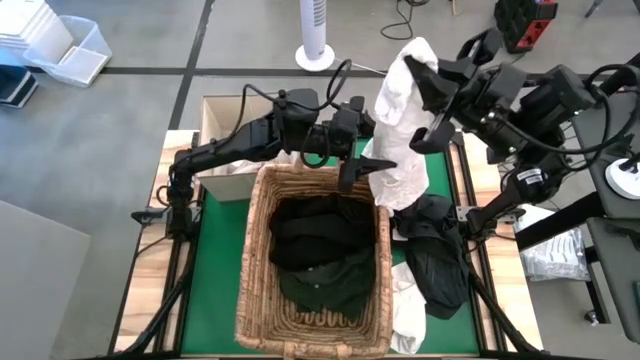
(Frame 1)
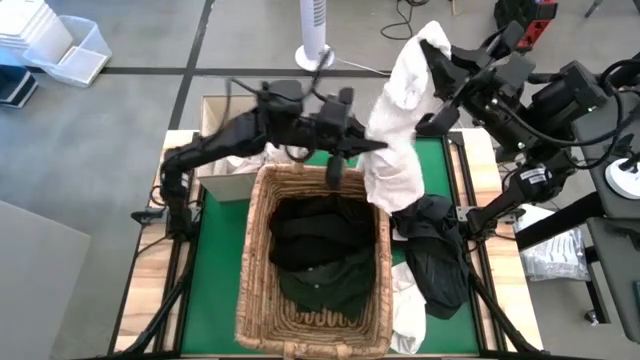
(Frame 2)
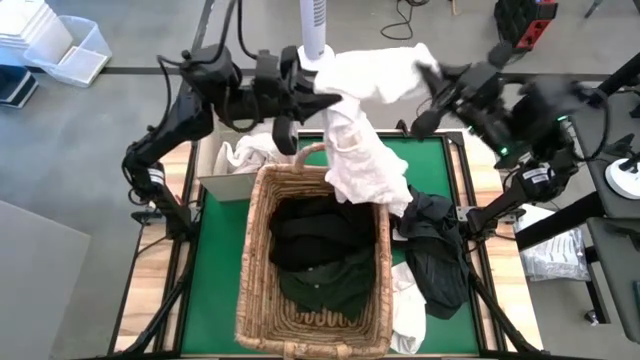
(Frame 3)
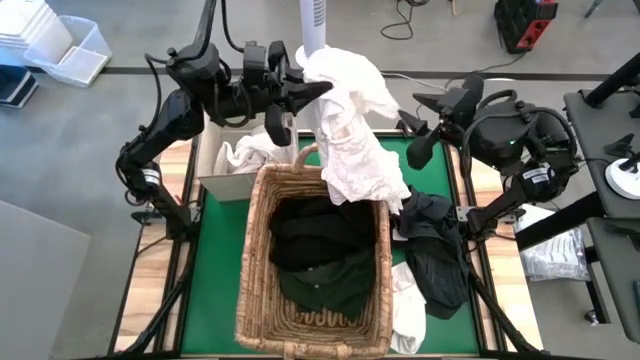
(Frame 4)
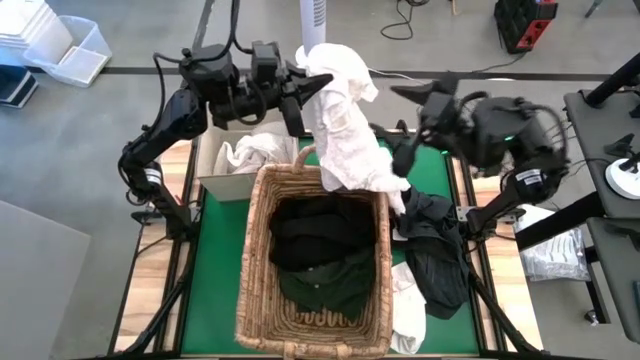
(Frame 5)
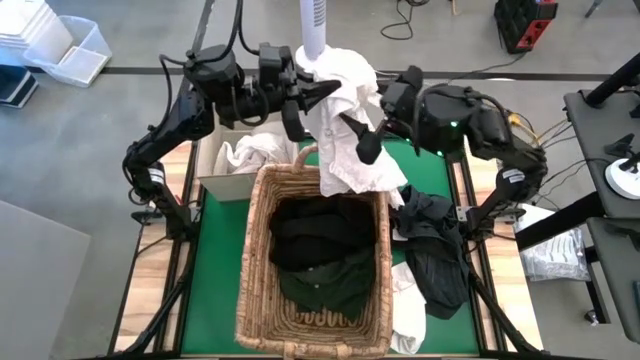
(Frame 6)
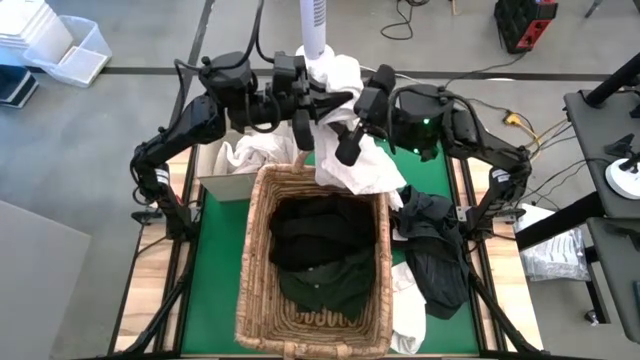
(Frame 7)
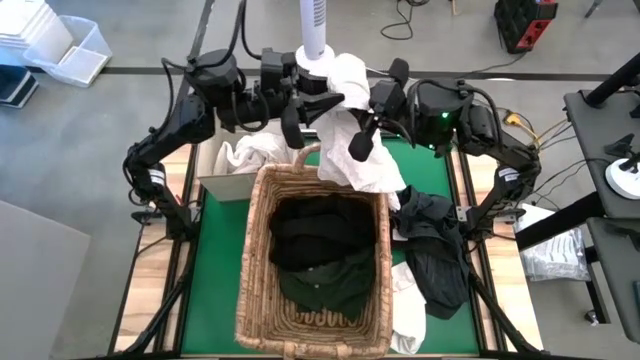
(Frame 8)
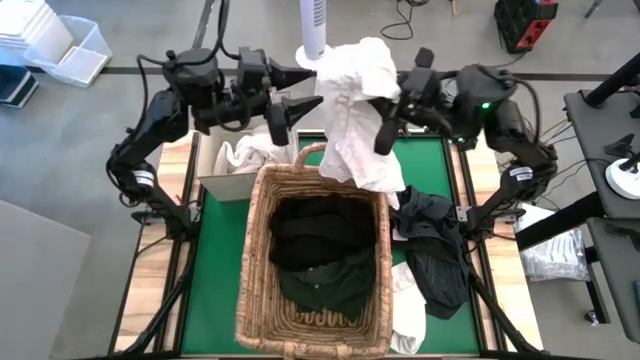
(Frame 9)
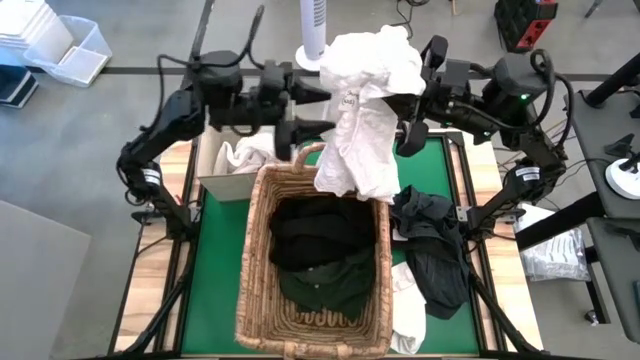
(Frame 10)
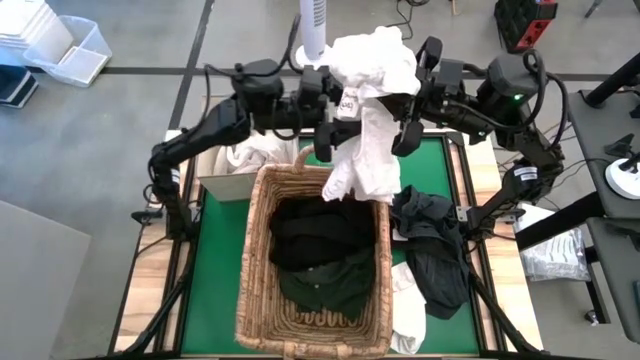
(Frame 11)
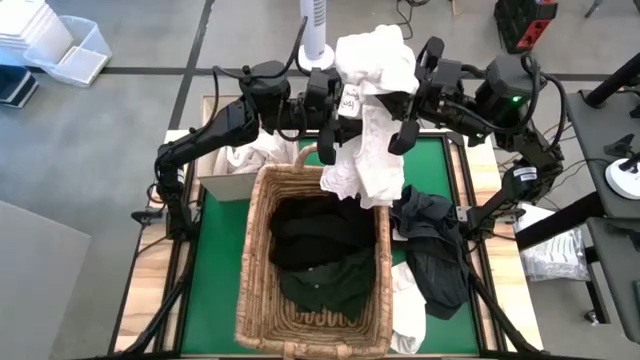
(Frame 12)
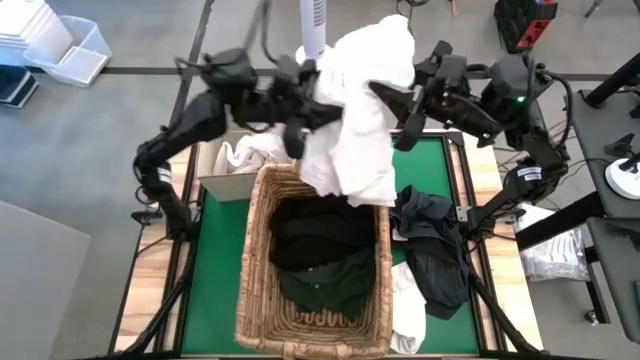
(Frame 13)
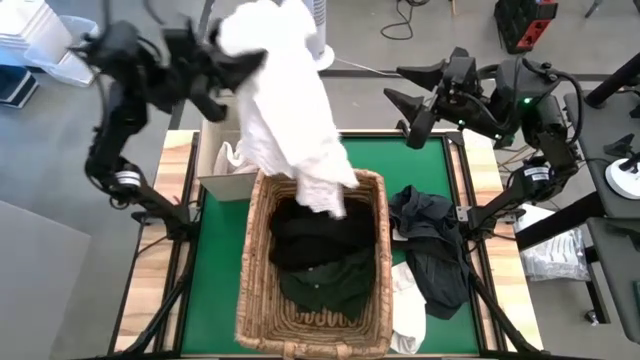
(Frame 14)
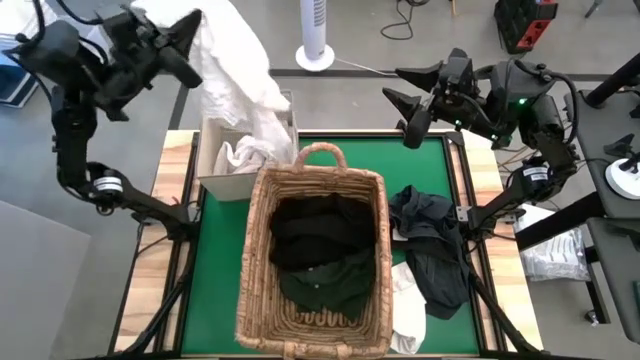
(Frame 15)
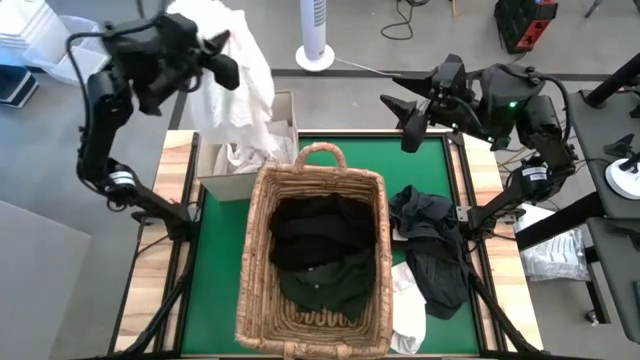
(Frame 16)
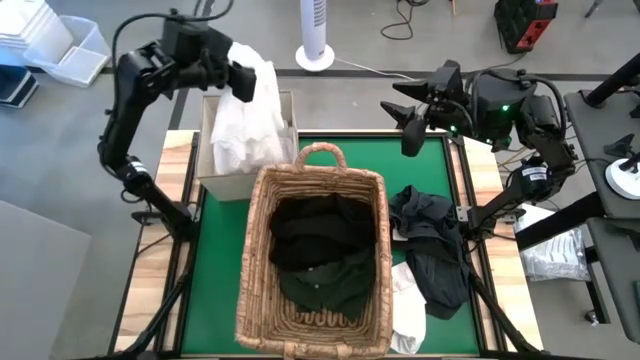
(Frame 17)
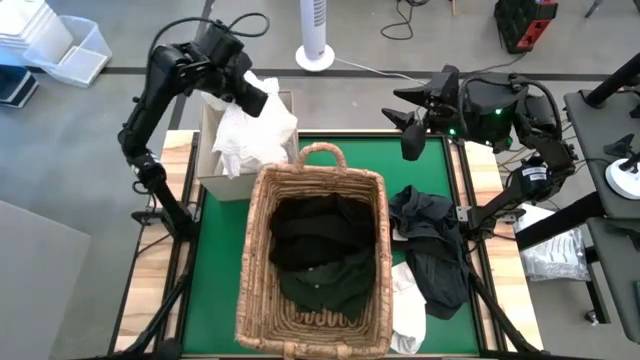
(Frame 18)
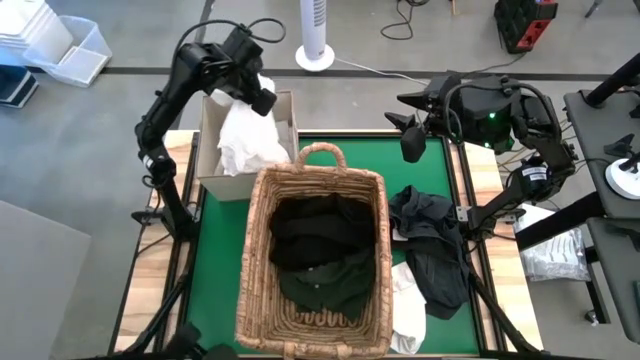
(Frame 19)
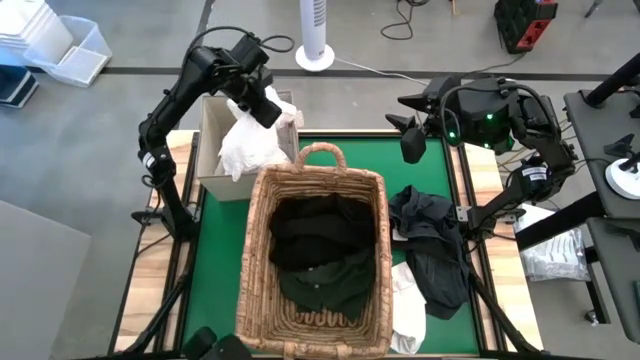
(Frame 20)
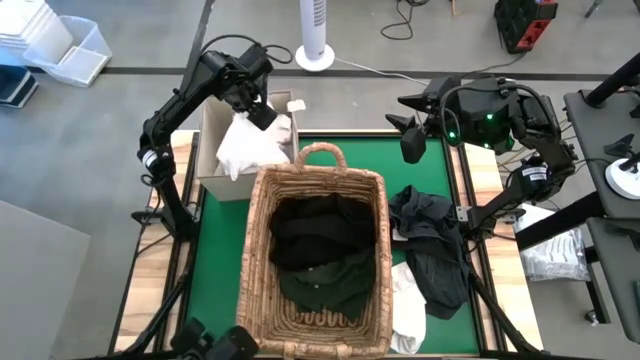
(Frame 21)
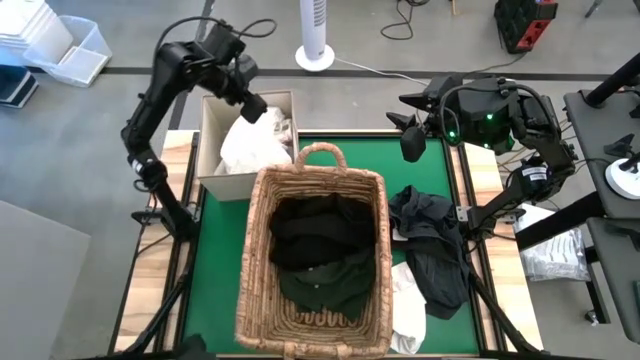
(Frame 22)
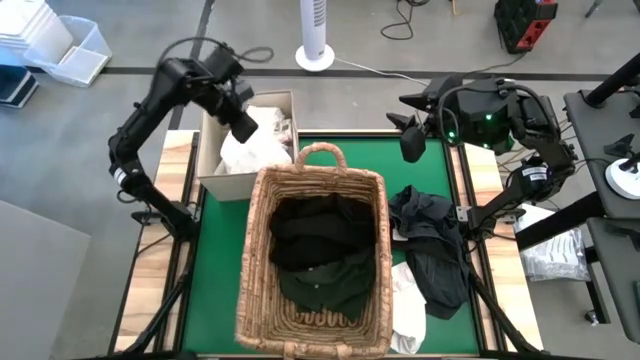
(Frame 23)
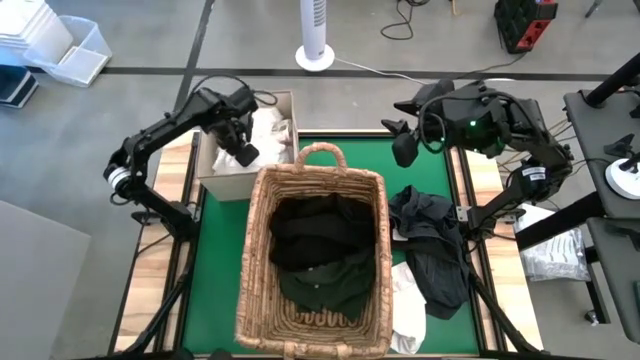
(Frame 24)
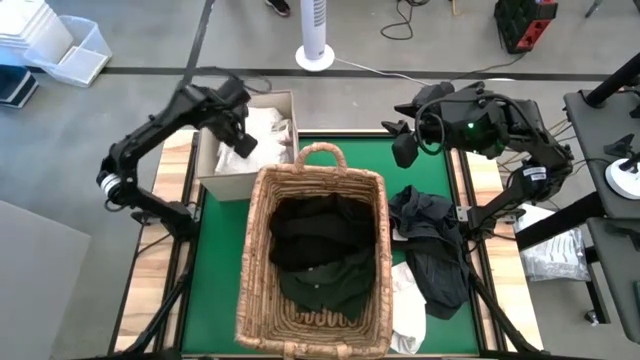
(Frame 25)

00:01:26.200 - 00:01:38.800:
Put the white shirt into the gray laundry organizer

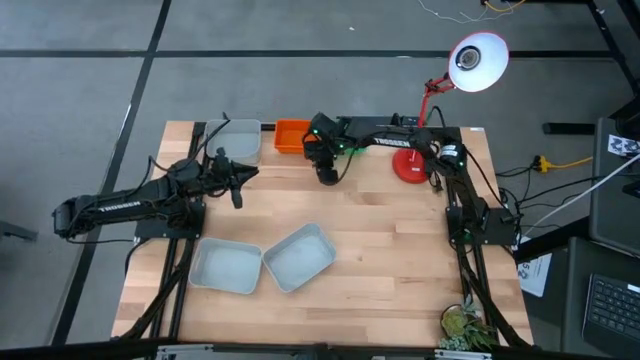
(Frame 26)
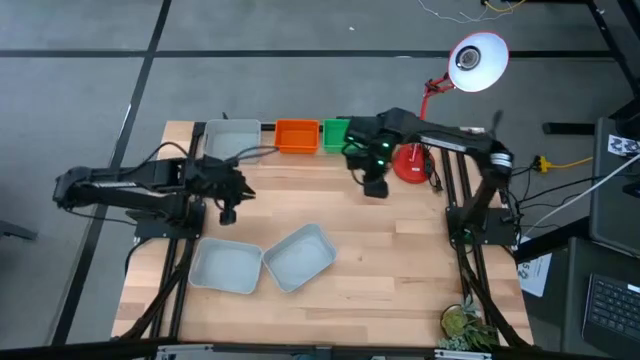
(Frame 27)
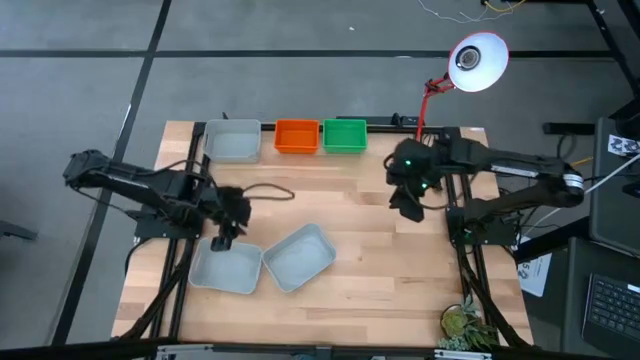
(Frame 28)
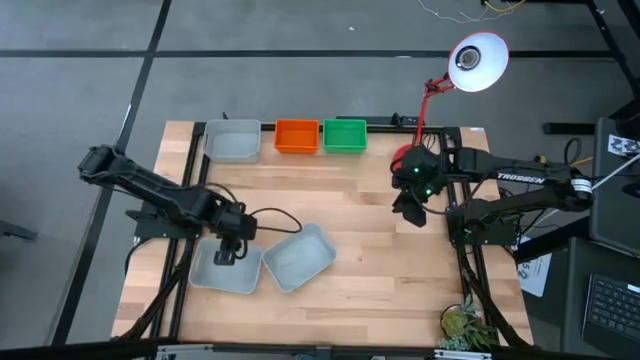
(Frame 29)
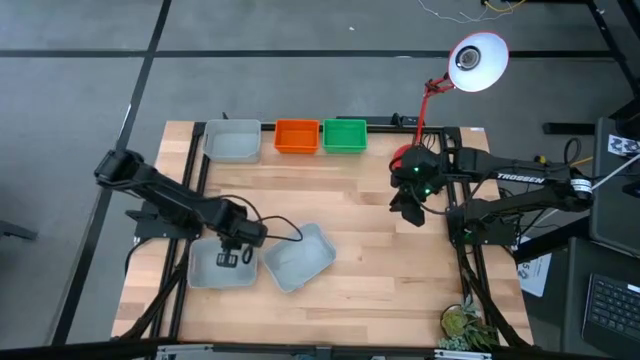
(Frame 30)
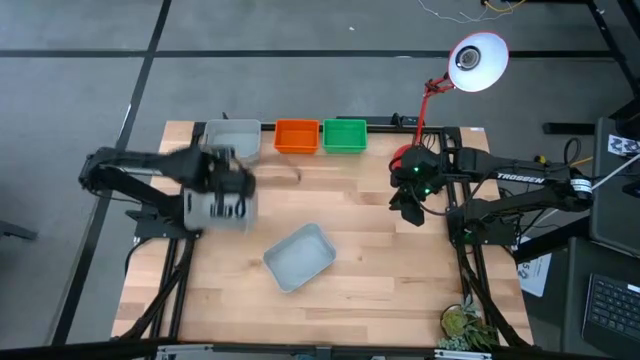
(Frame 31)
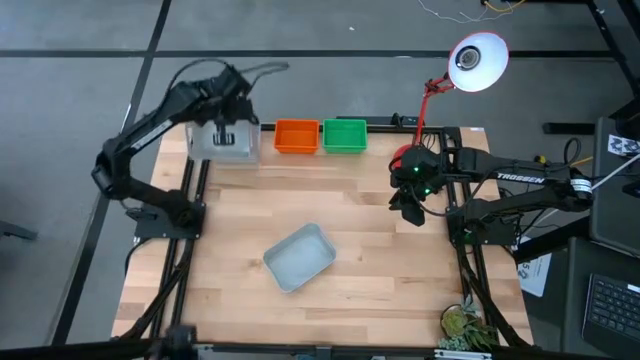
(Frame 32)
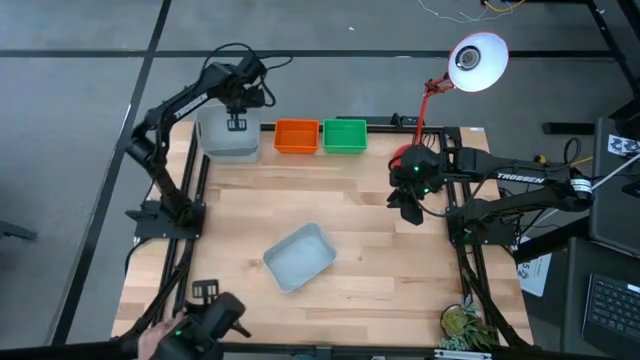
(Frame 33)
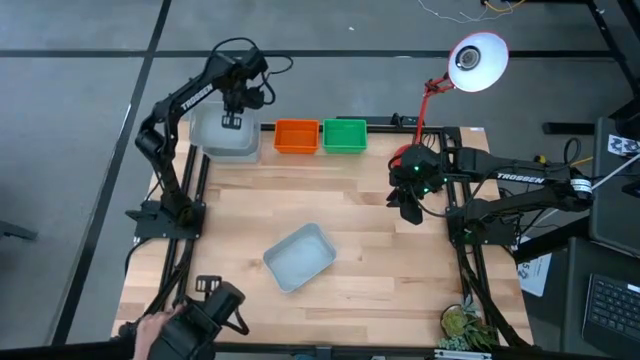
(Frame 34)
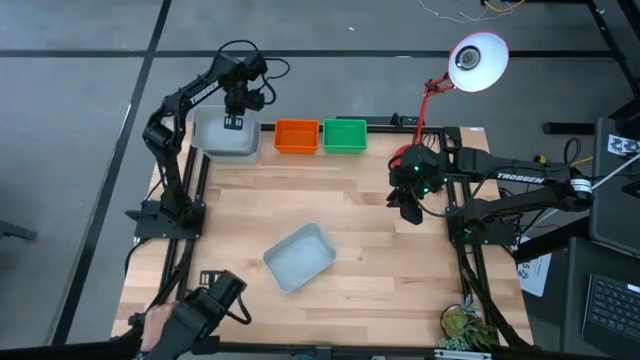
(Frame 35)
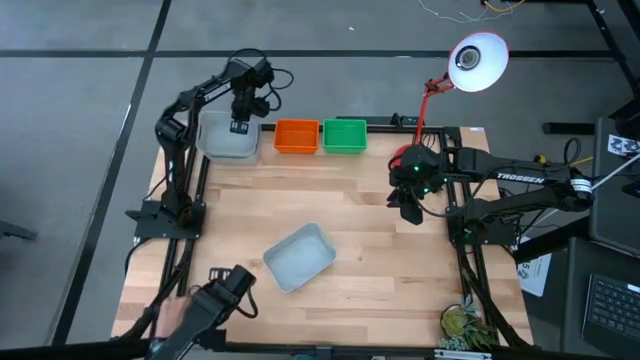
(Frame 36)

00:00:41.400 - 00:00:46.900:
Stack the left gray bin on the top gray bin
